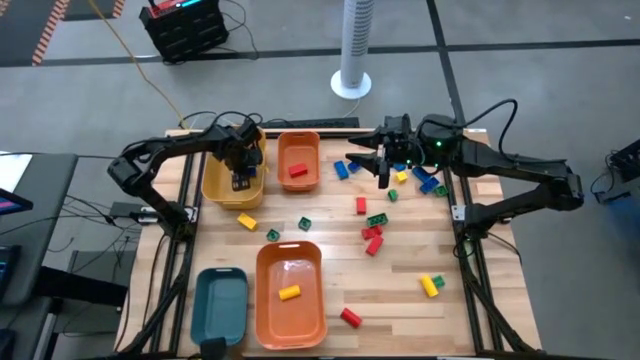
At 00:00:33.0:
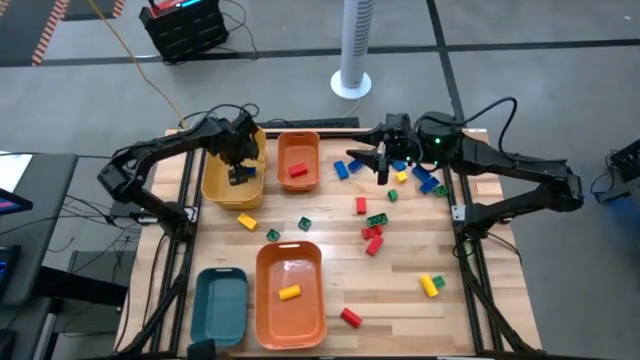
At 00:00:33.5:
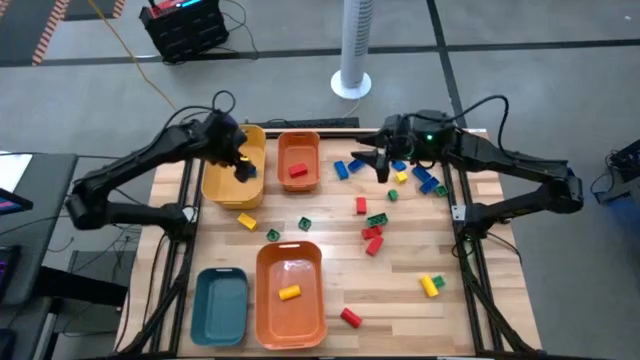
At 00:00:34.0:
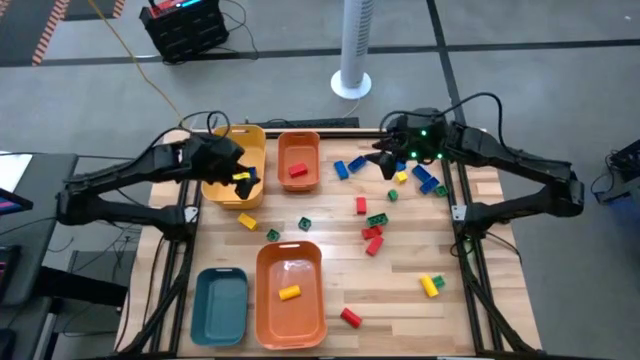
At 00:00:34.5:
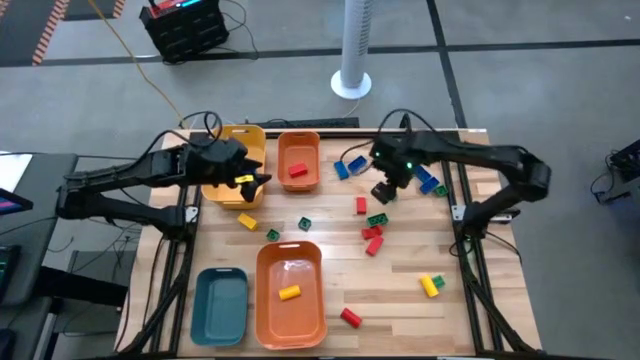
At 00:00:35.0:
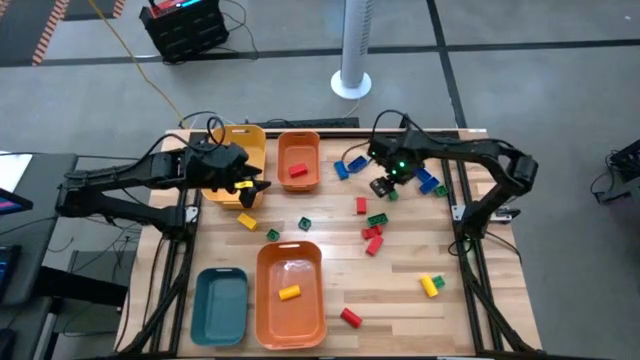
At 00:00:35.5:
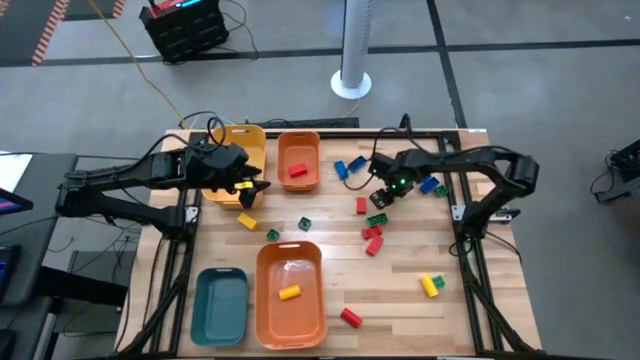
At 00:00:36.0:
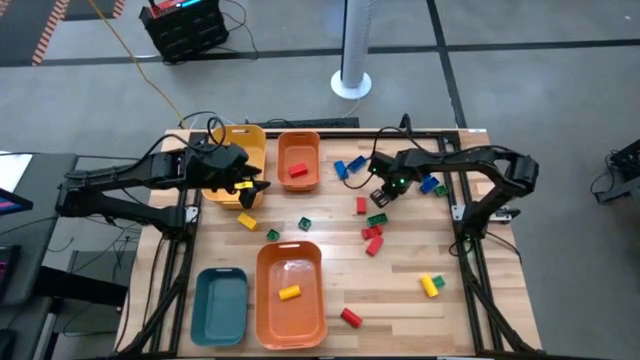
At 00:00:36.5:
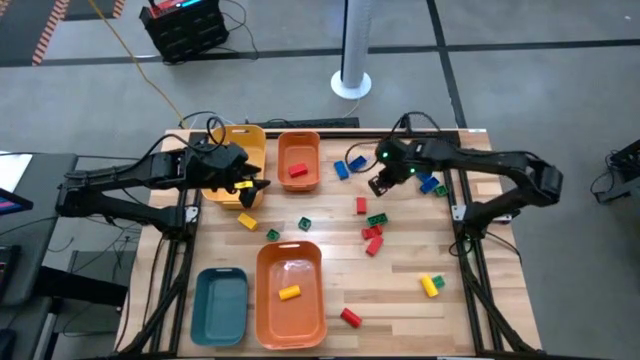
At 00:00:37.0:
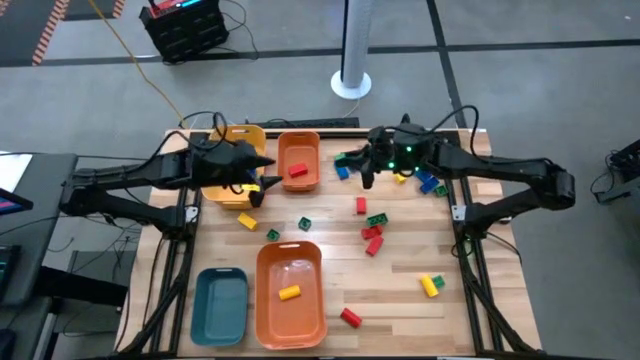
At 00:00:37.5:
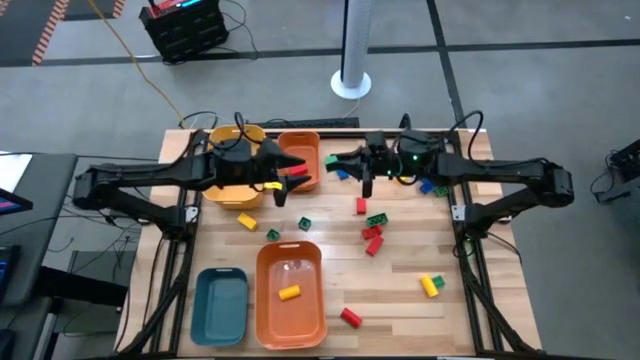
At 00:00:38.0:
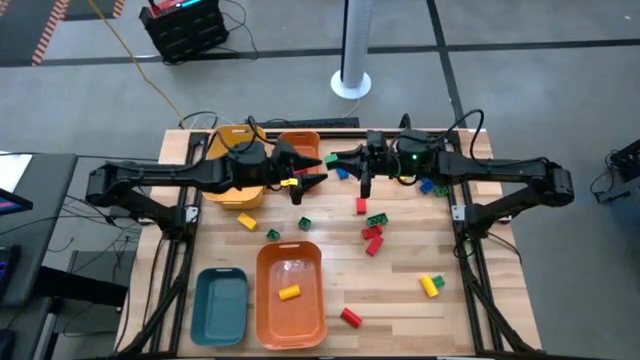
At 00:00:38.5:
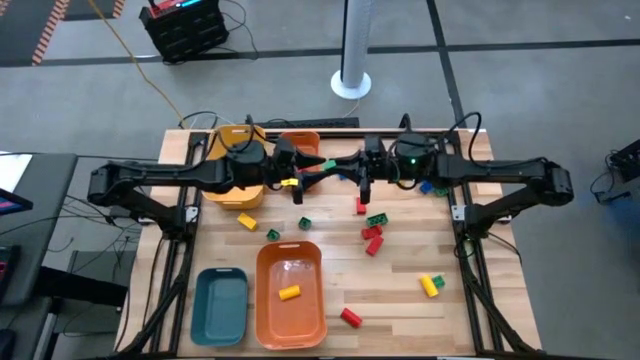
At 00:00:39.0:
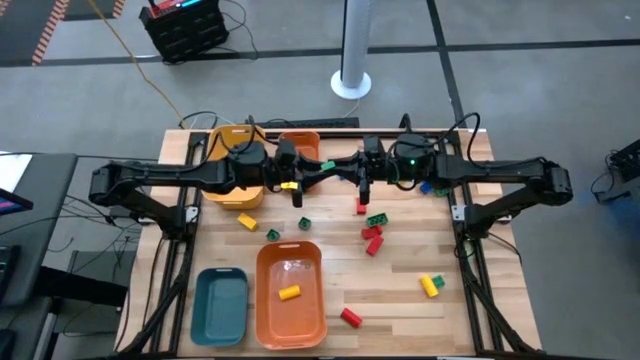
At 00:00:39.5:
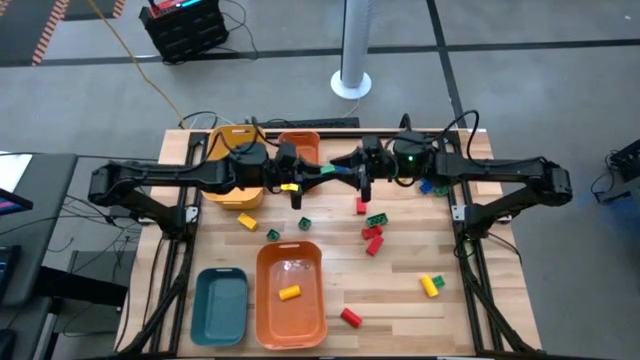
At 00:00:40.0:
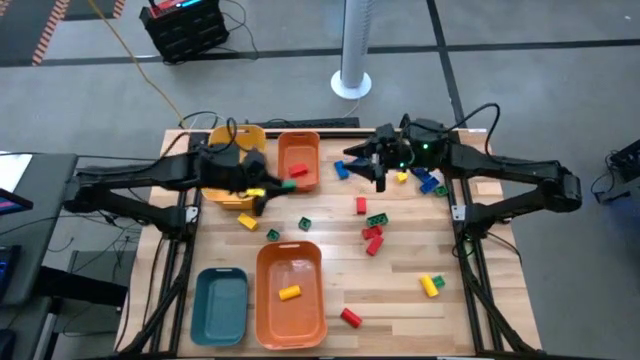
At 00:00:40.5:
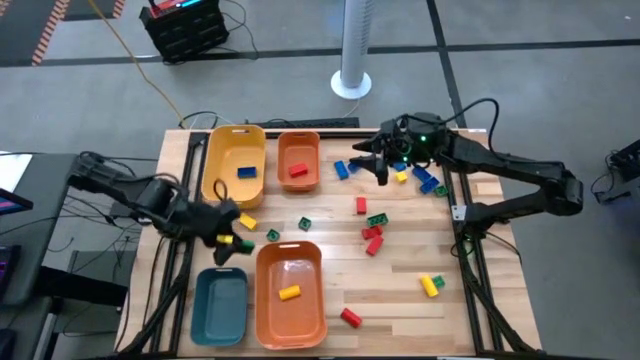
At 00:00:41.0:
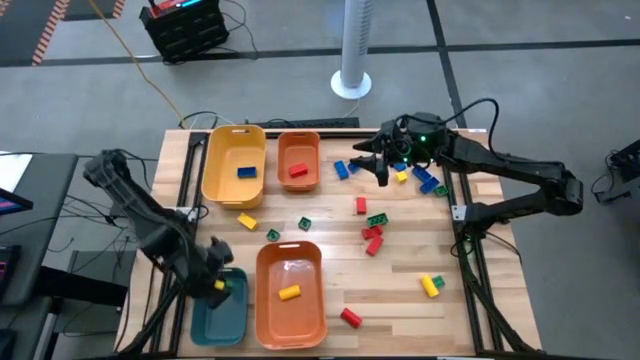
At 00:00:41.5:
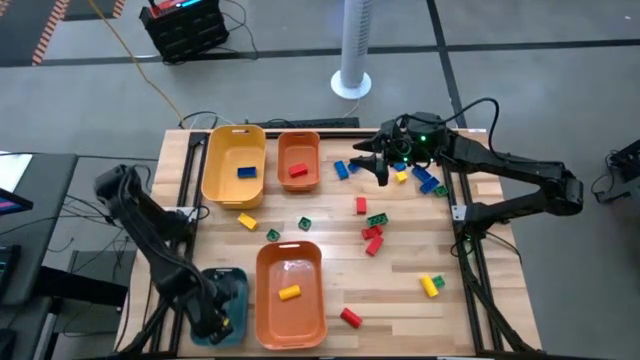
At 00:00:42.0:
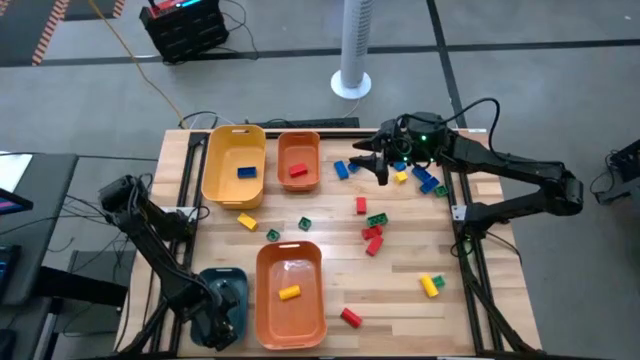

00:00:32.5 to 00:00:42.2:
Task: Sort blocks
Put the green game piece into the blue bin

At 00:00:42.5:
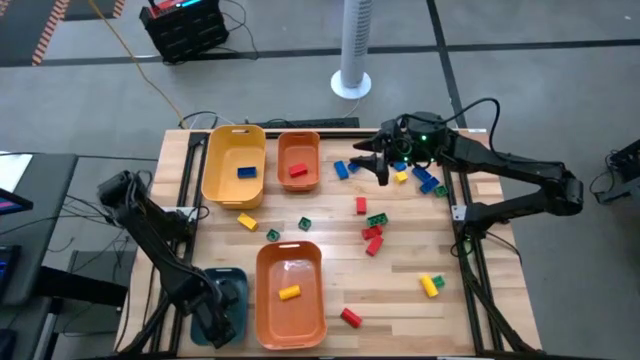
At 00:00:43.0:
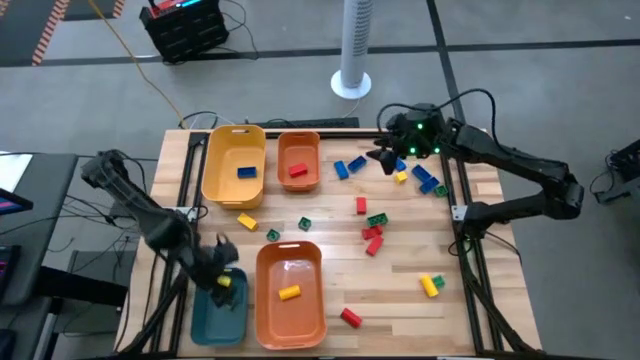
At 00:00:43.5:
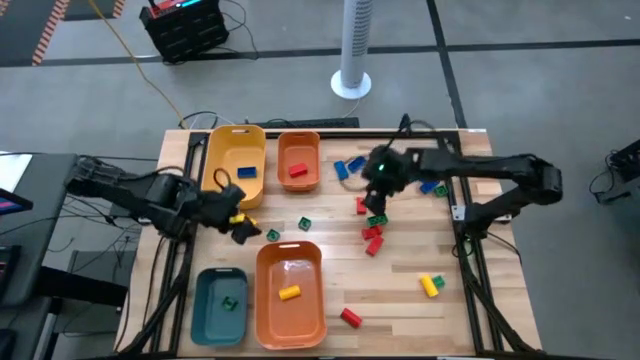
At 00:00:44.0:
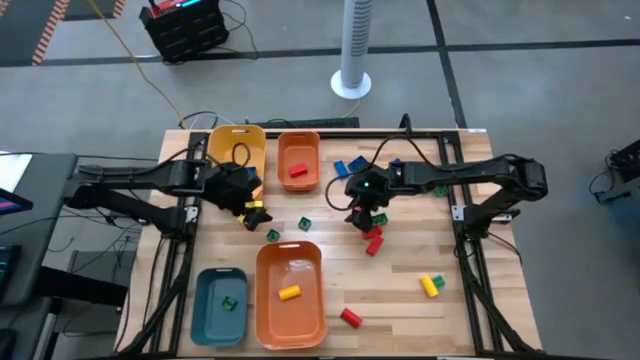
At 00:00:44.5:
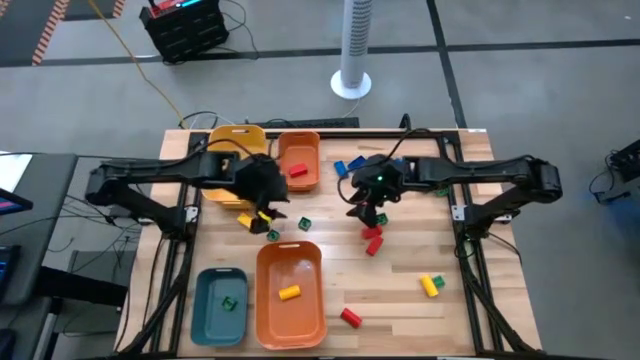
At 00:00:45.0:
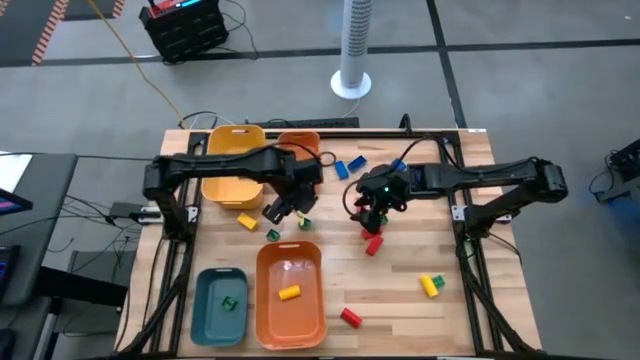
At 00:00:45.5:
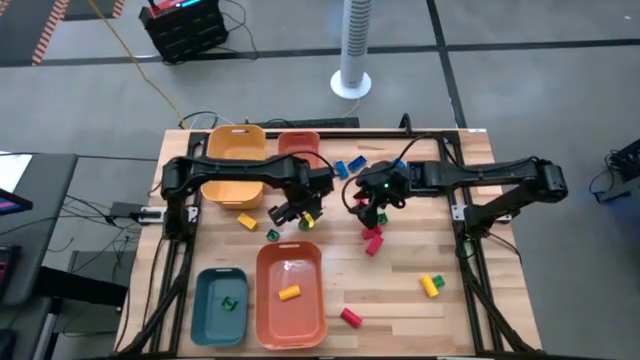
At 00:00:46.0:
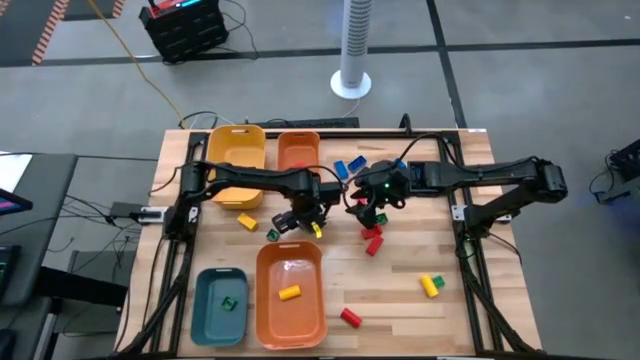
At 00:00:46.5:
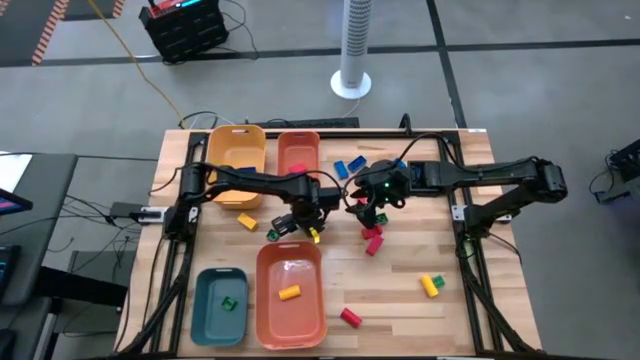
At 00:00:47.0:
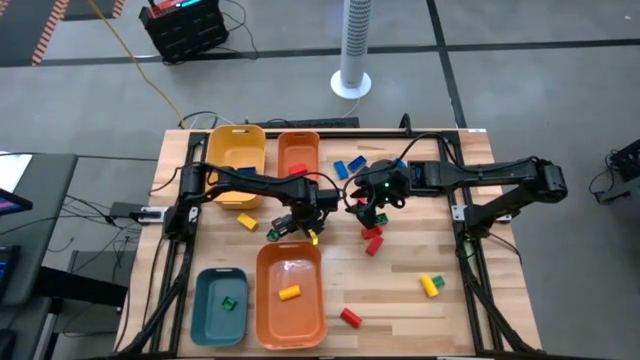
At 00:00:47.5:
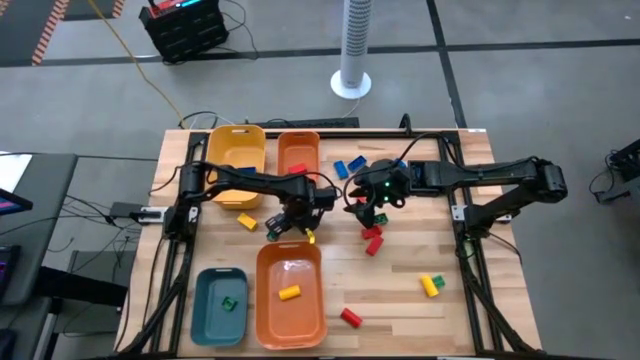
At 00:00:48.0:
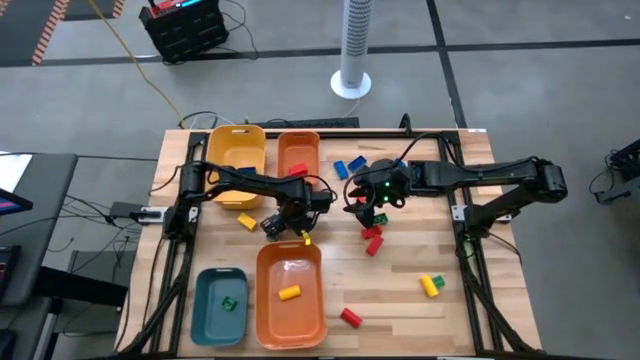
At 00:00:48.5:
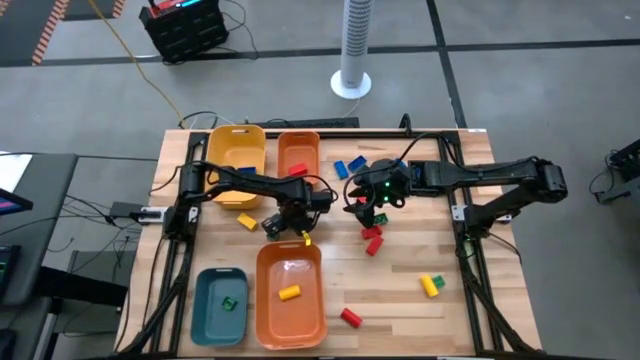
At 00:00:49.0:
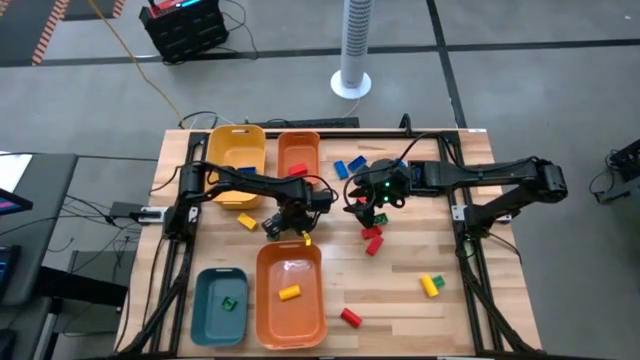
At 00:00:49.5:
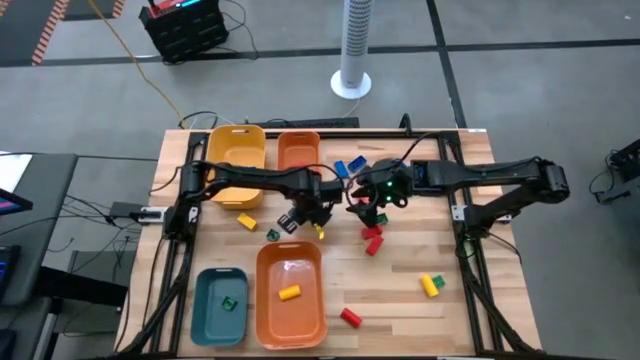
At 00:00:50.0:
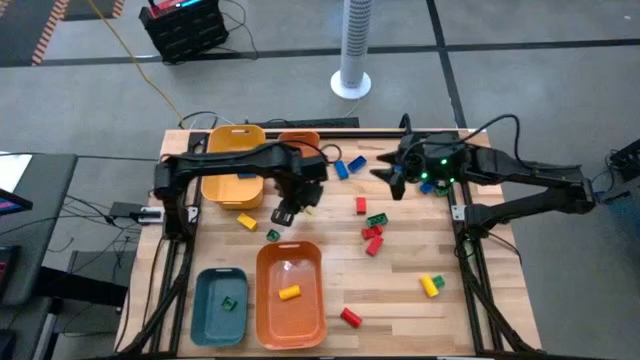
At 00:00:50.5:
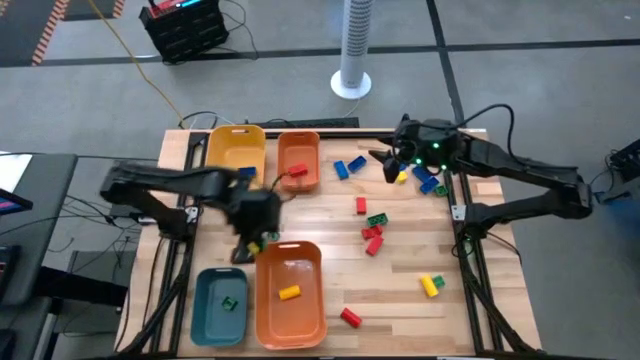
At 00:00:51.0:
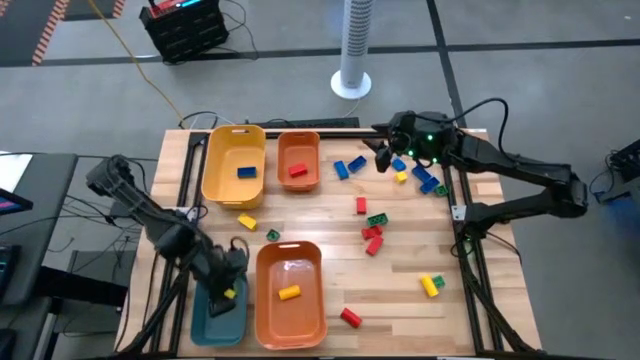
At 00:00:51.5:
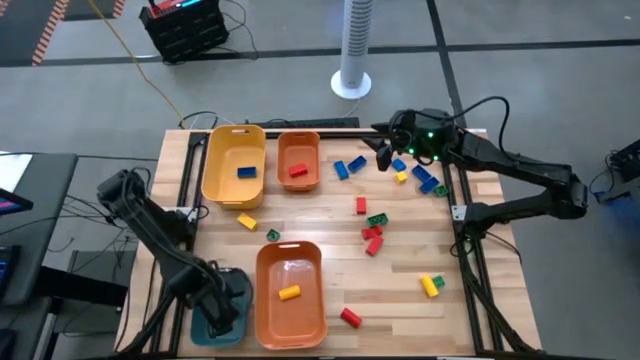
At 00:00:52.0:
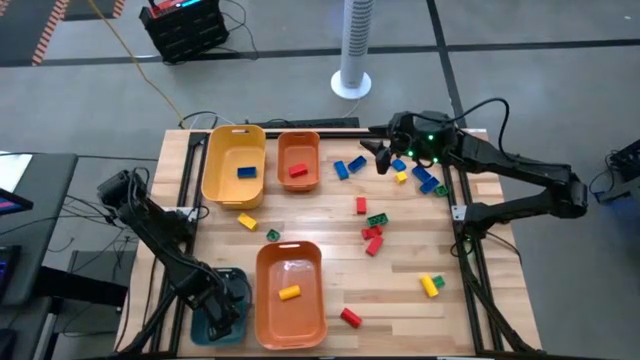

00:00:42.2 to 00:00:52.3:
Put the green game piece into the blue bin
